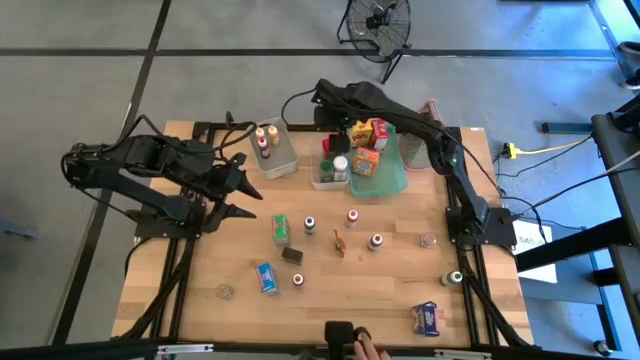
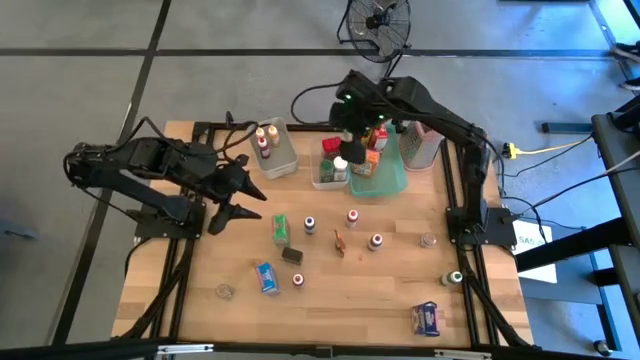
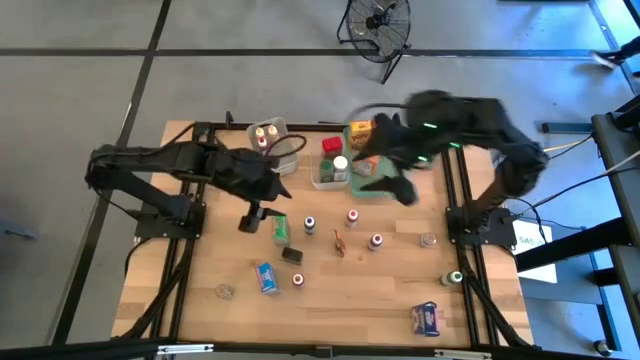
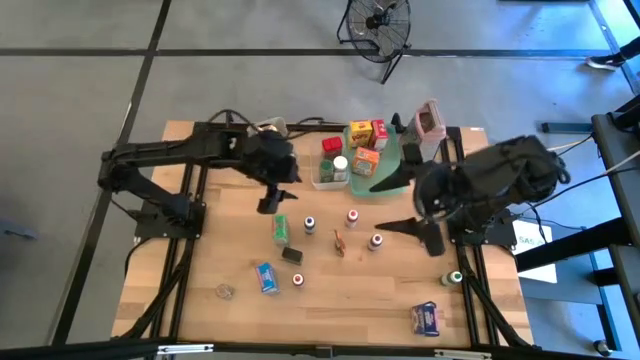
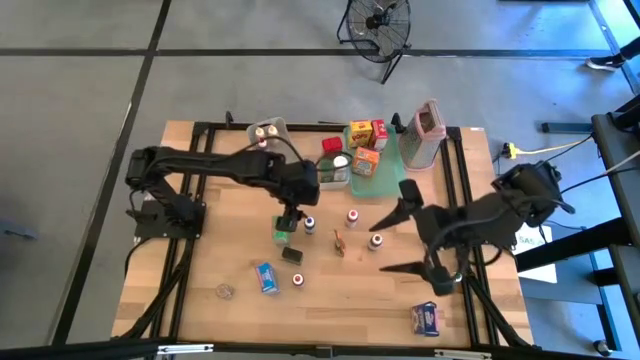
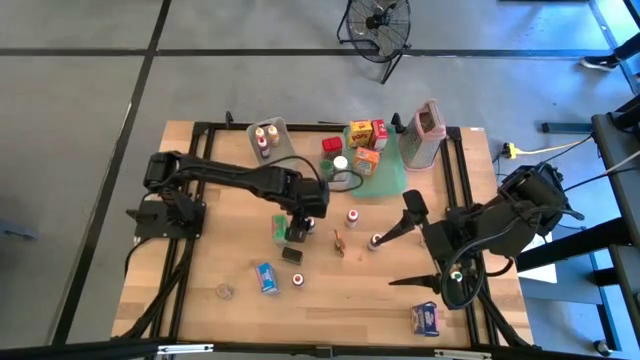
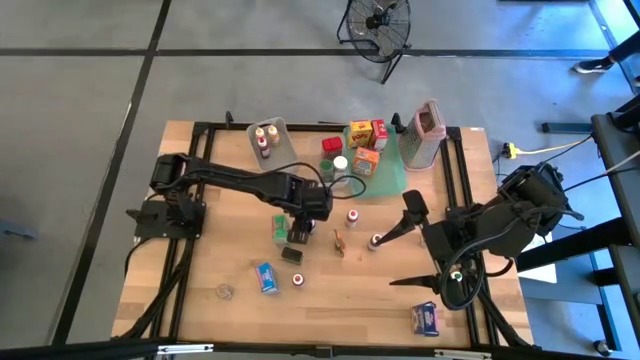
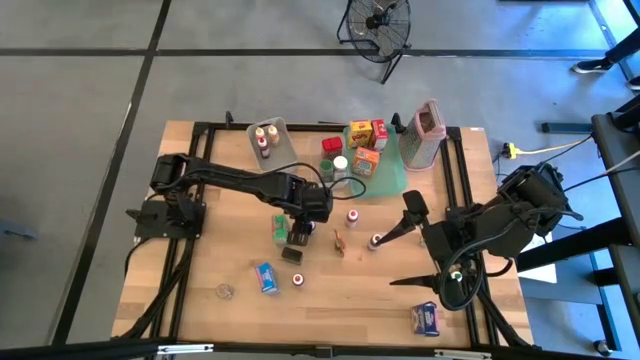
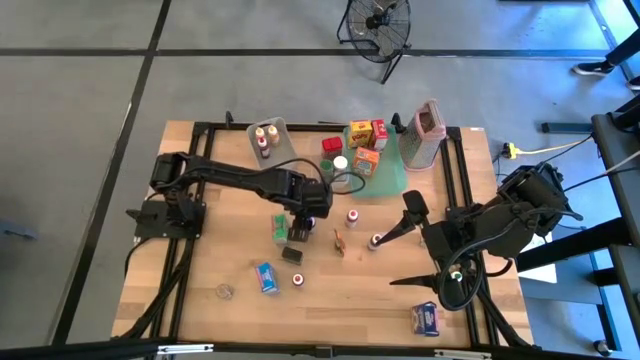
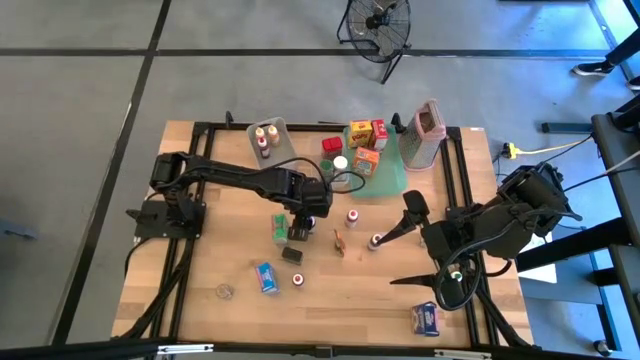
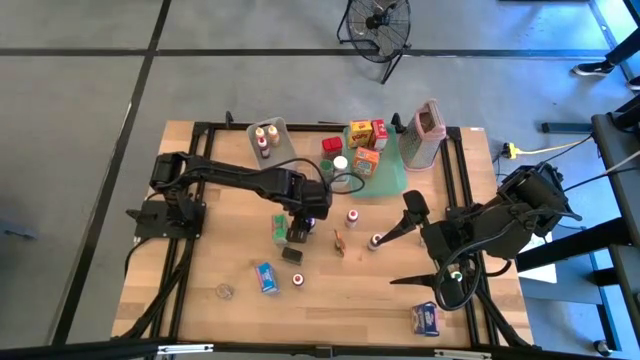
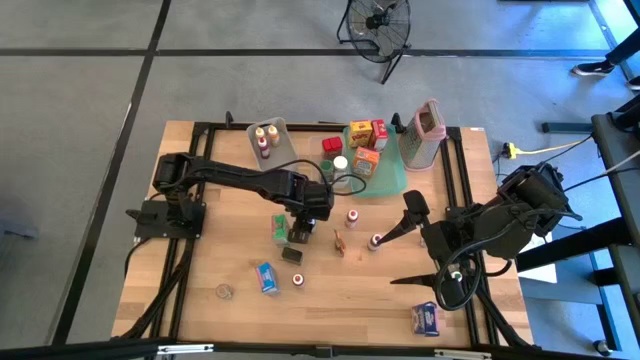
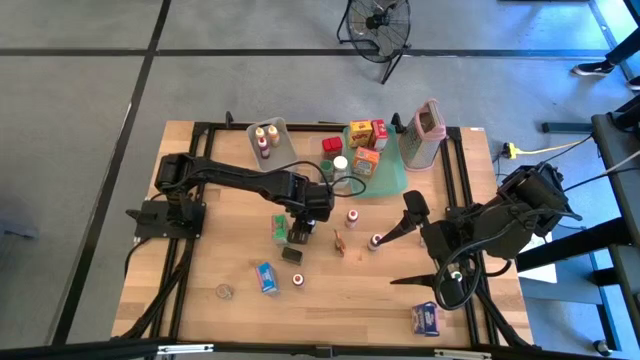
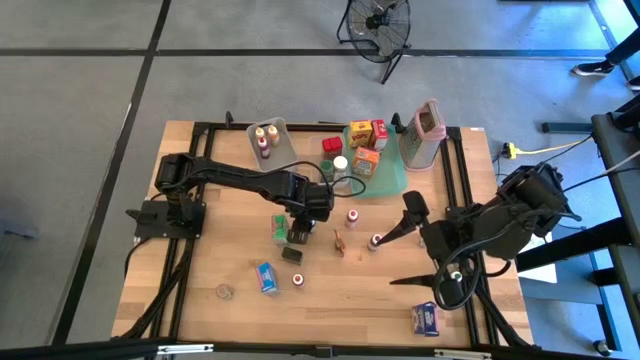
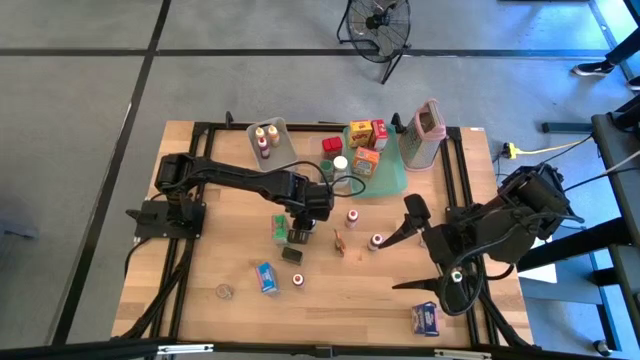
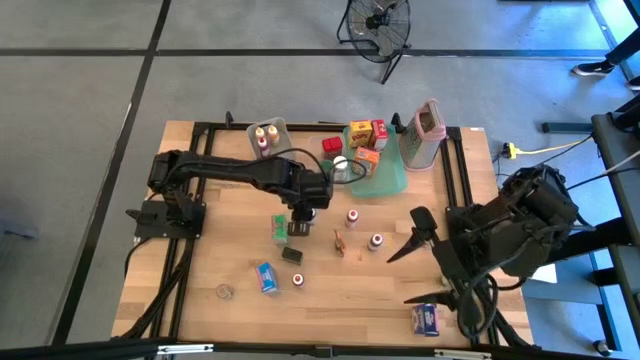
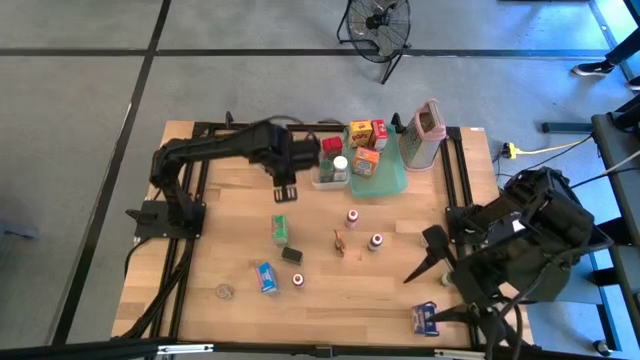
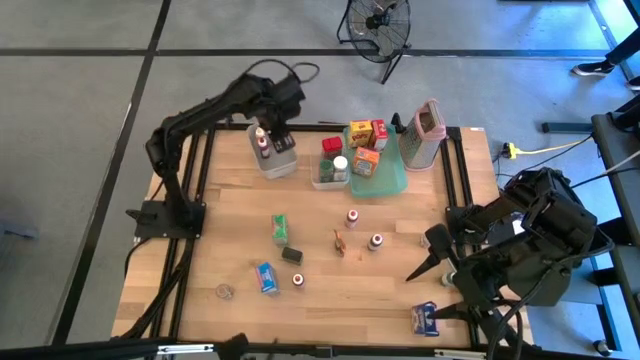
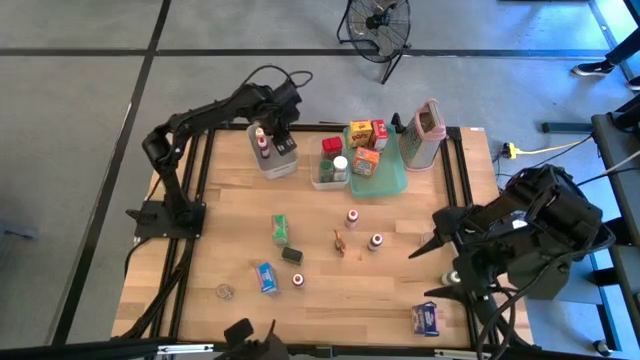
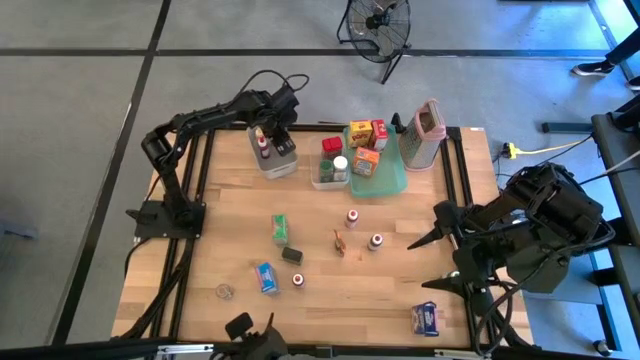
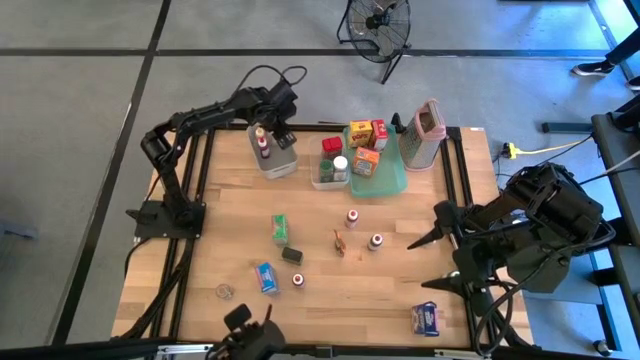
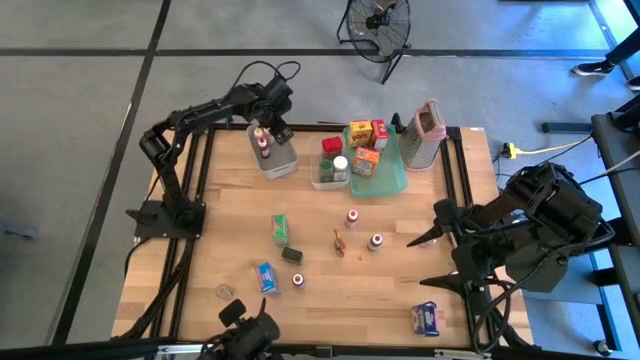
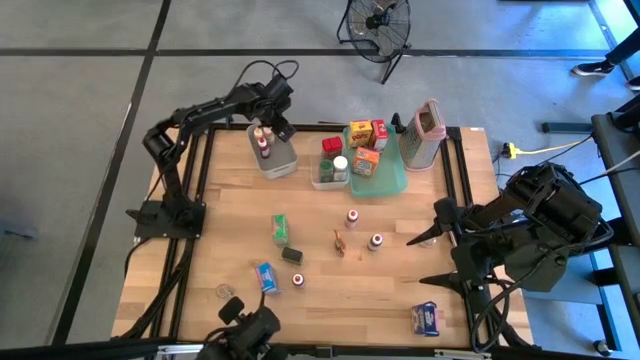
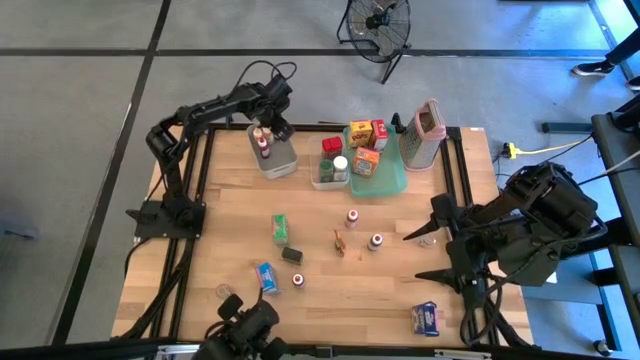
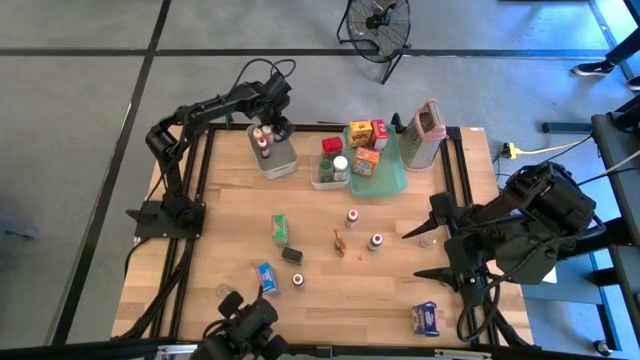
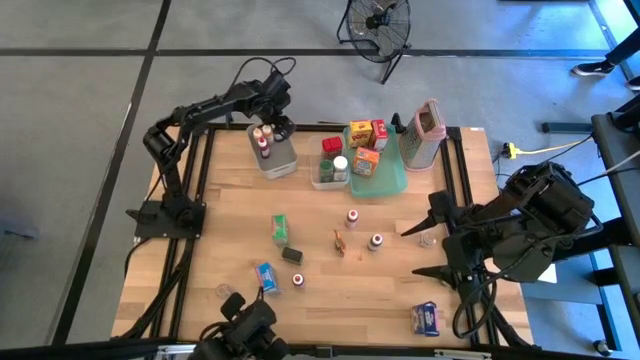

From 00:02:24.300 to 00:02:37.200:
Task: Pick & Place Kitchen Items
Put the blue food coloring bottle into the gray bin

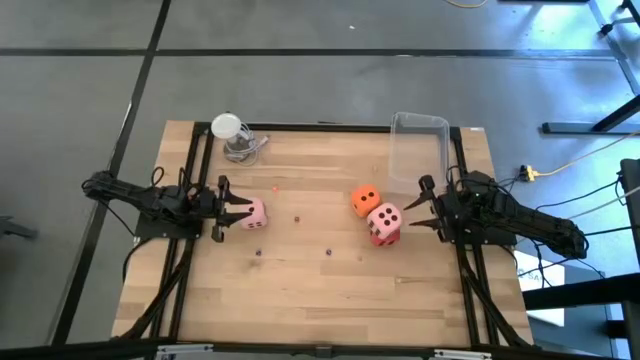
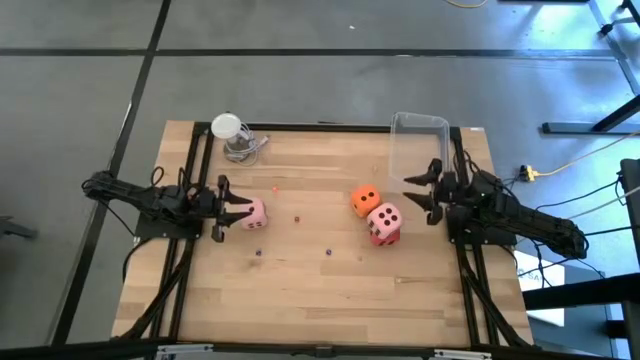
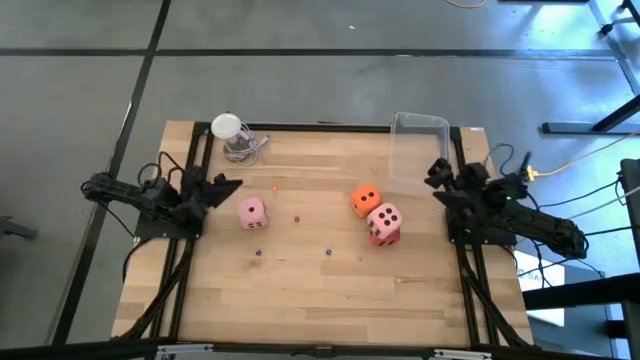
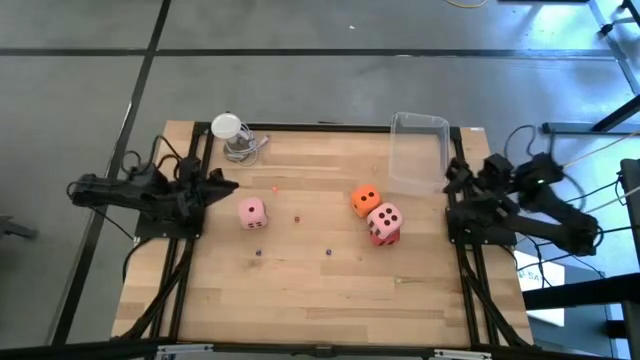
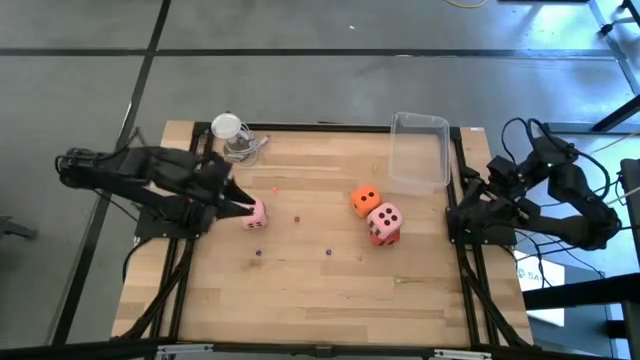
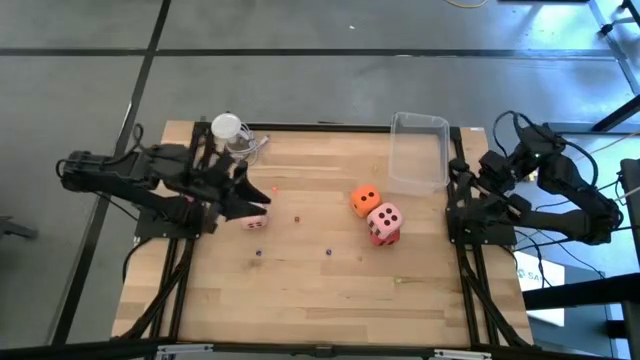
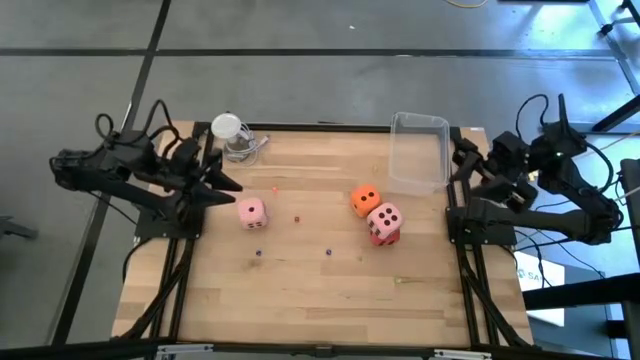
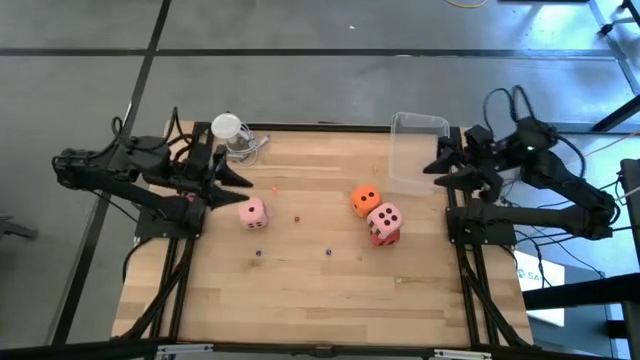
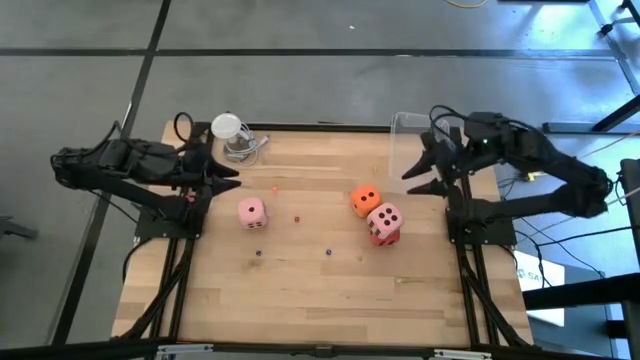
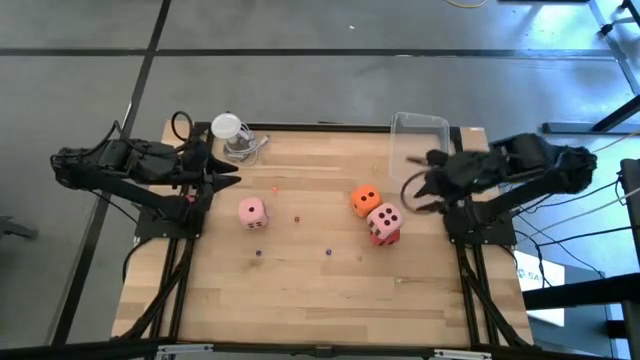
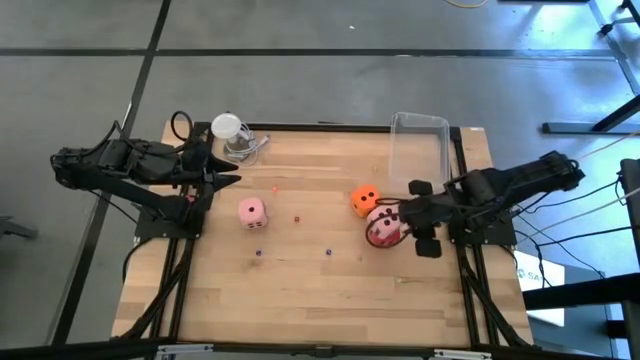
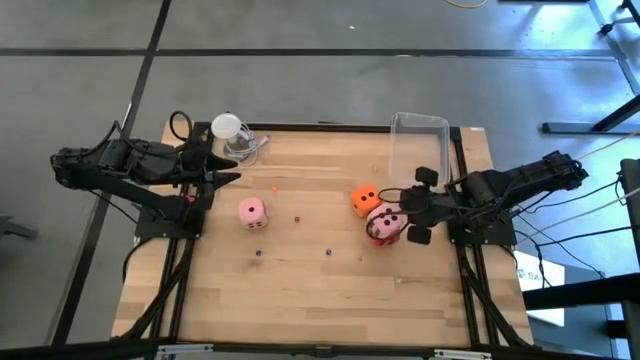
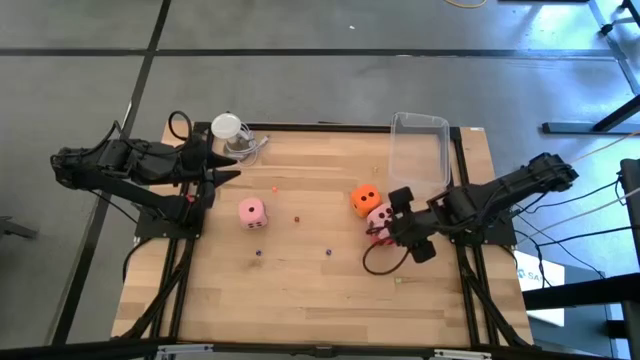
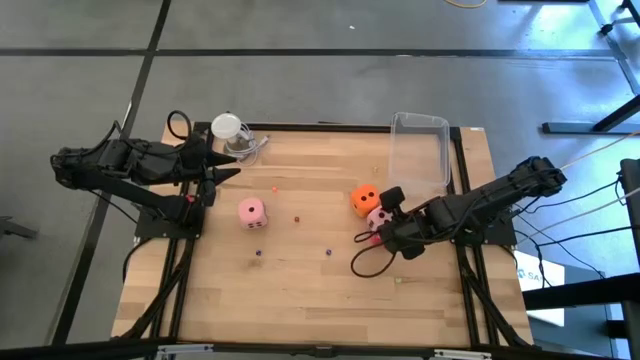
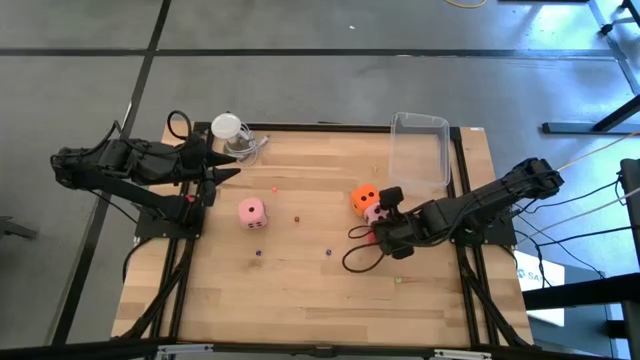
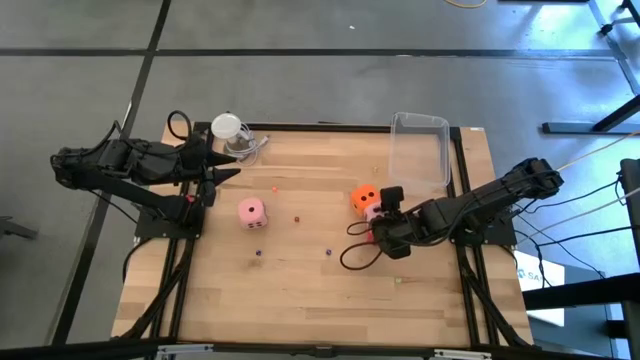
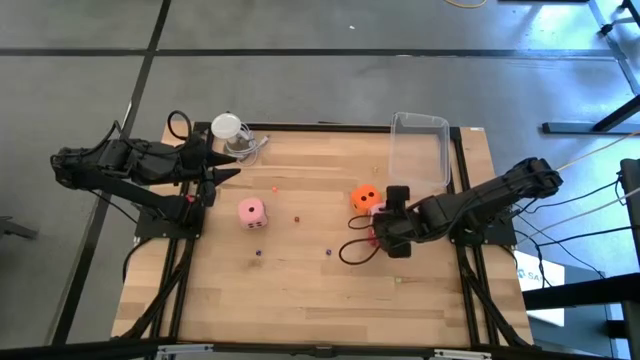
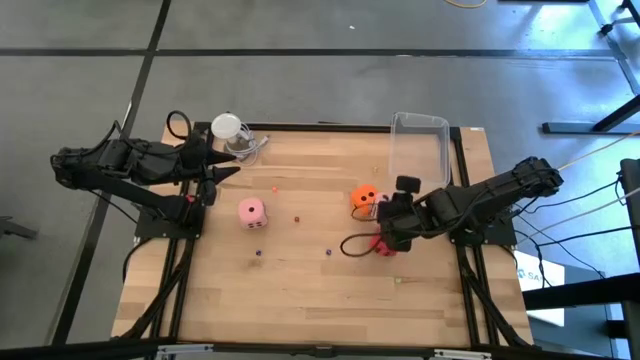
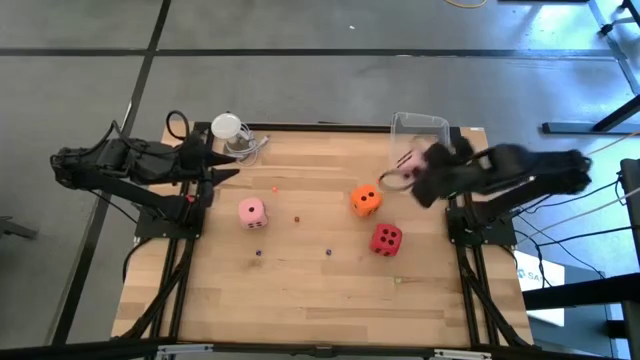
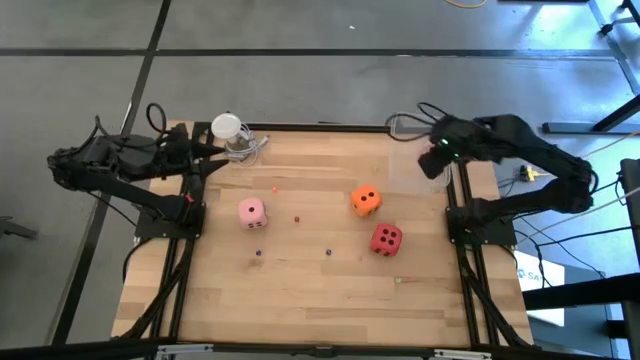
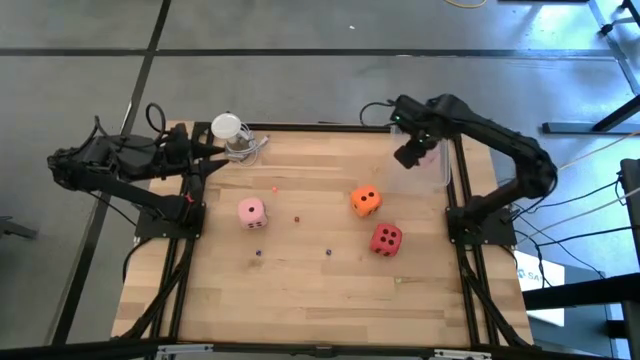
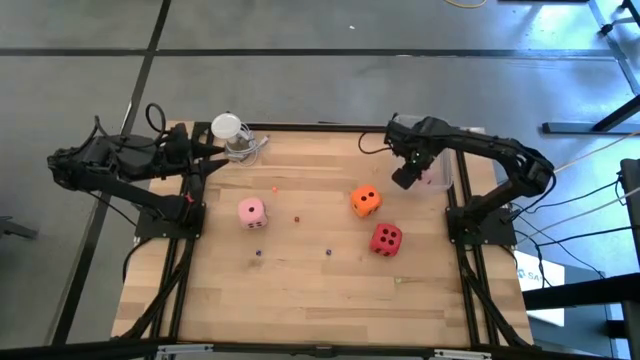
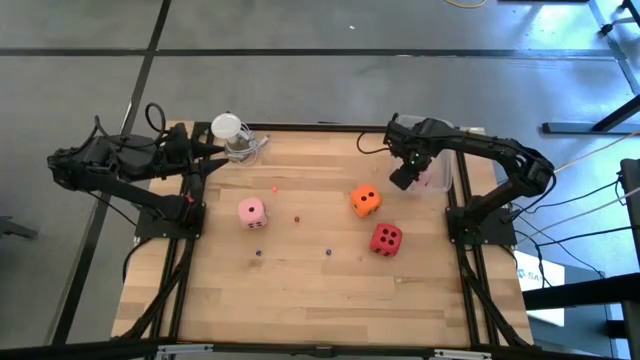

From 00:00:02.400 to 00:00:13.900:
Task: Pick & Place Dice
Put the right large pink die into the container
